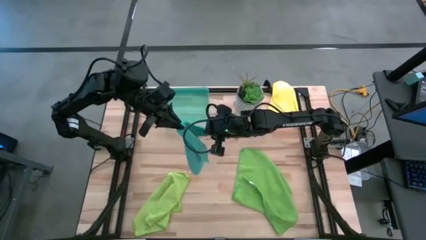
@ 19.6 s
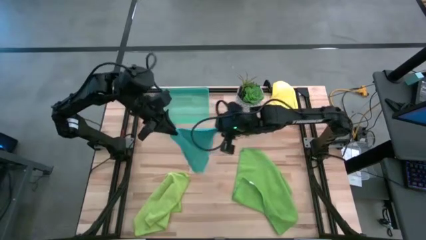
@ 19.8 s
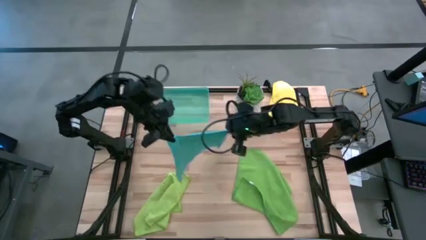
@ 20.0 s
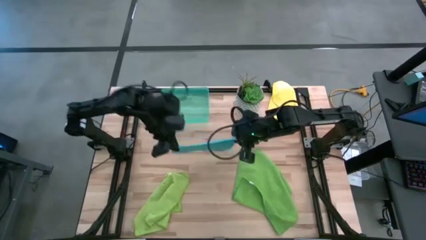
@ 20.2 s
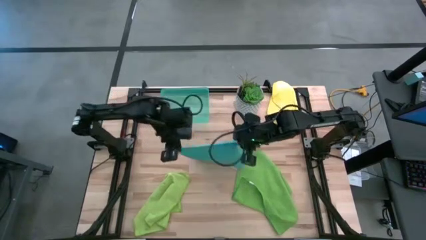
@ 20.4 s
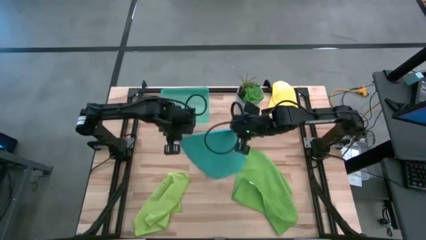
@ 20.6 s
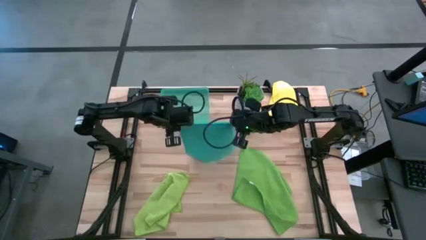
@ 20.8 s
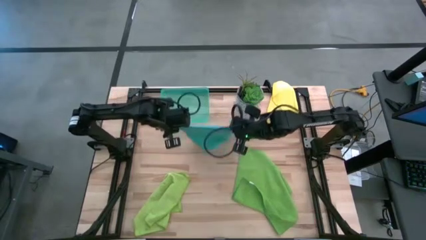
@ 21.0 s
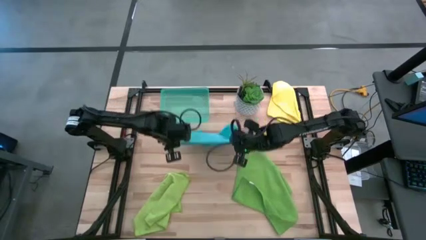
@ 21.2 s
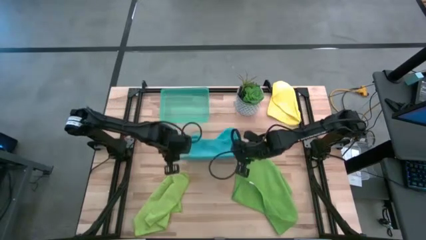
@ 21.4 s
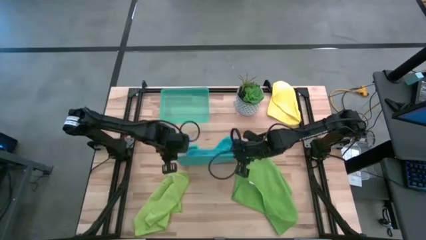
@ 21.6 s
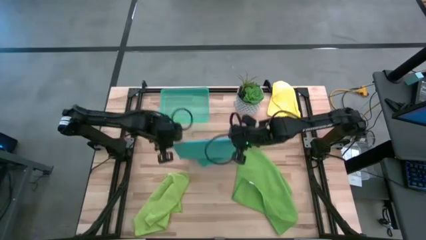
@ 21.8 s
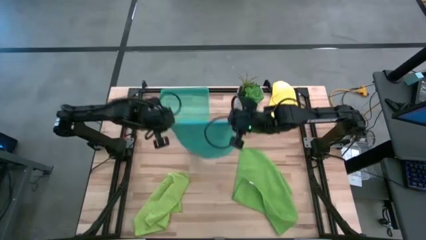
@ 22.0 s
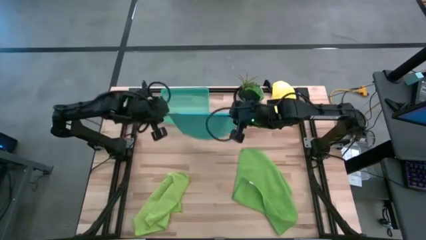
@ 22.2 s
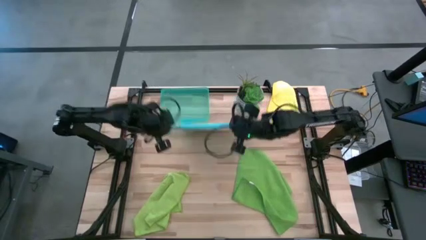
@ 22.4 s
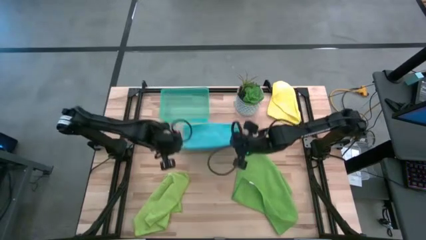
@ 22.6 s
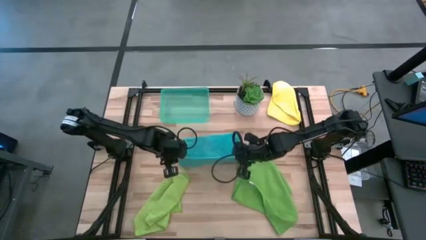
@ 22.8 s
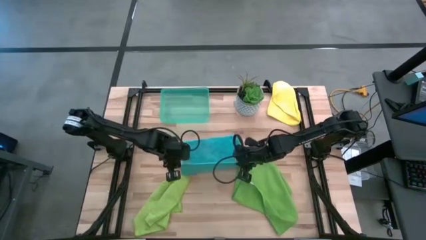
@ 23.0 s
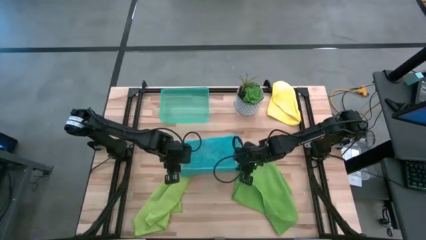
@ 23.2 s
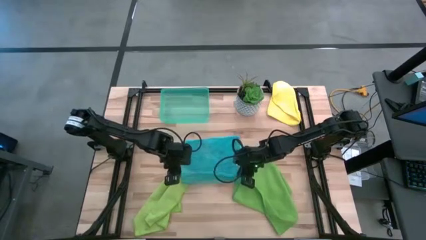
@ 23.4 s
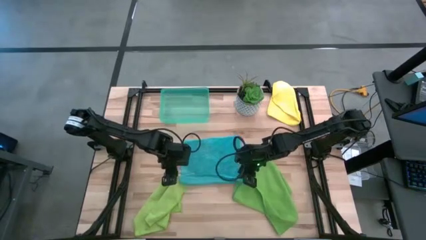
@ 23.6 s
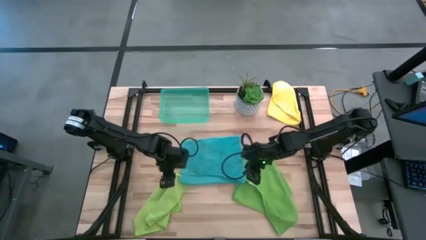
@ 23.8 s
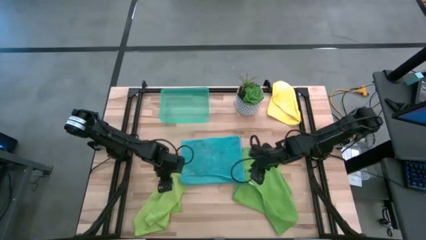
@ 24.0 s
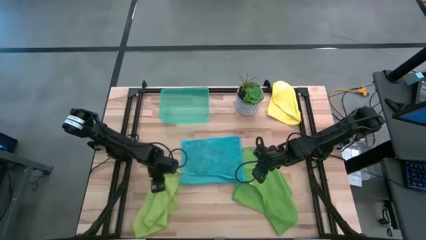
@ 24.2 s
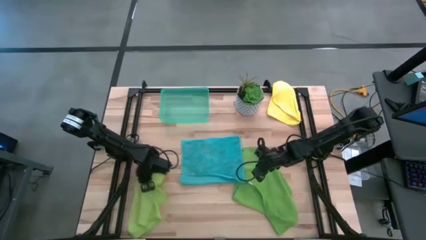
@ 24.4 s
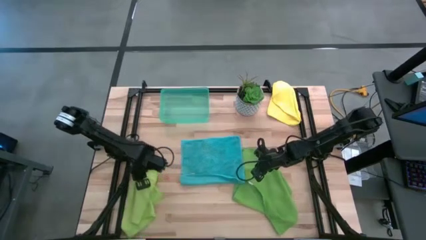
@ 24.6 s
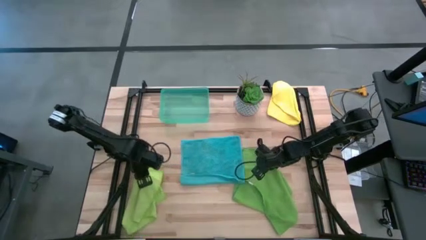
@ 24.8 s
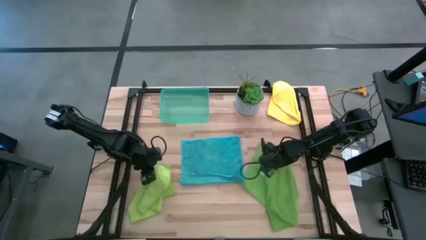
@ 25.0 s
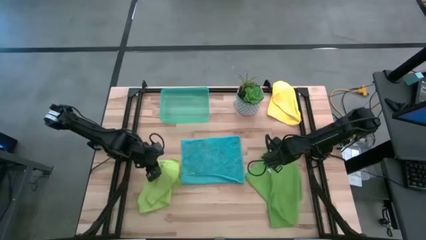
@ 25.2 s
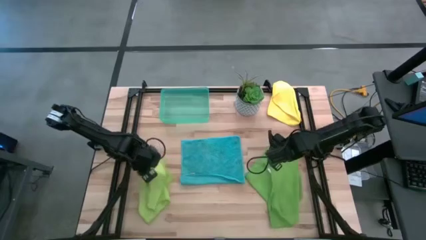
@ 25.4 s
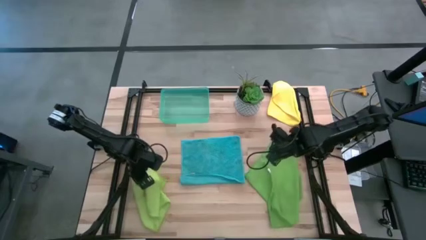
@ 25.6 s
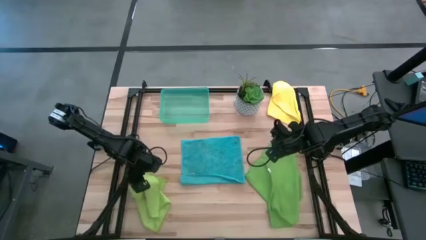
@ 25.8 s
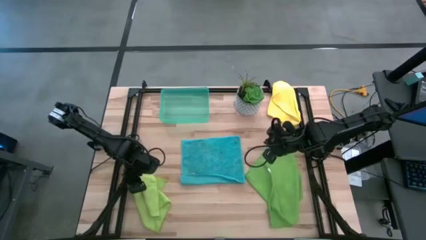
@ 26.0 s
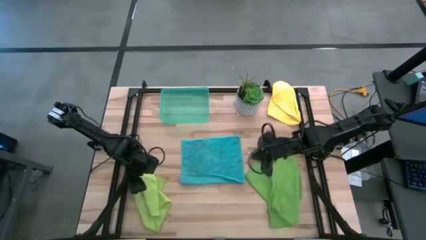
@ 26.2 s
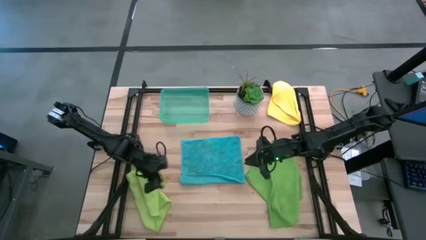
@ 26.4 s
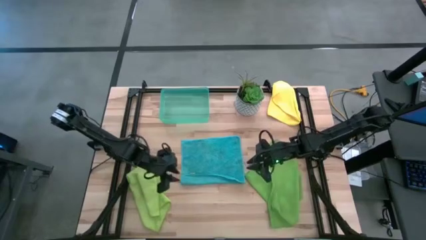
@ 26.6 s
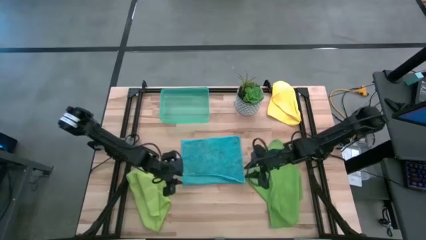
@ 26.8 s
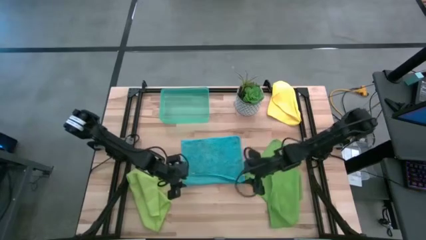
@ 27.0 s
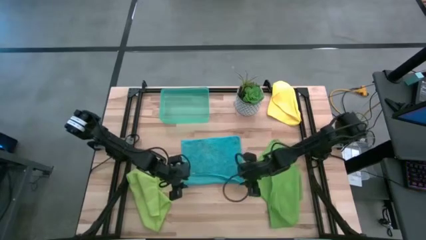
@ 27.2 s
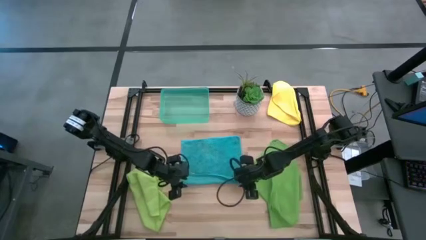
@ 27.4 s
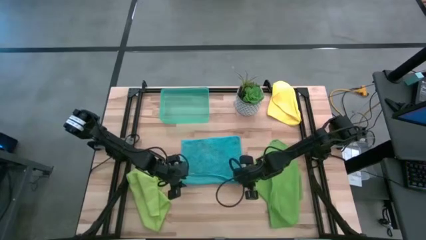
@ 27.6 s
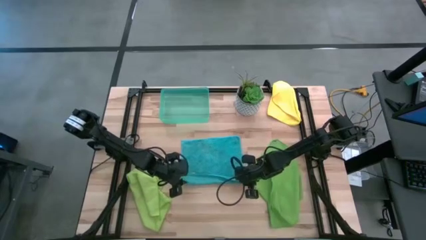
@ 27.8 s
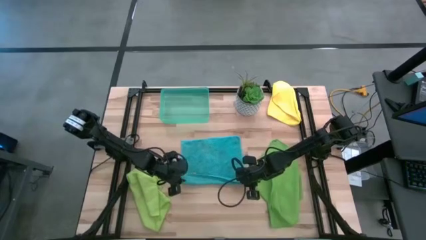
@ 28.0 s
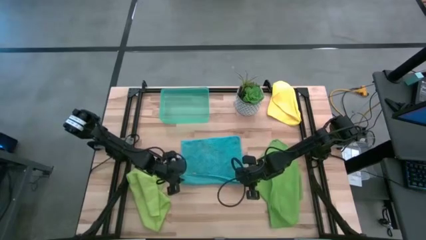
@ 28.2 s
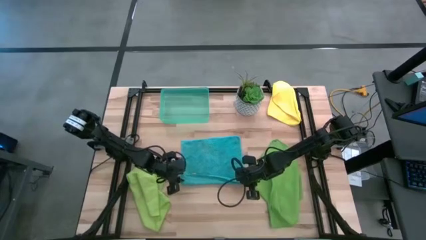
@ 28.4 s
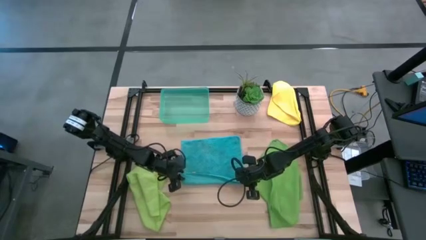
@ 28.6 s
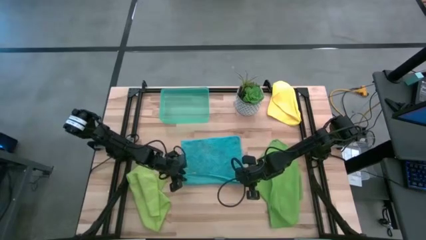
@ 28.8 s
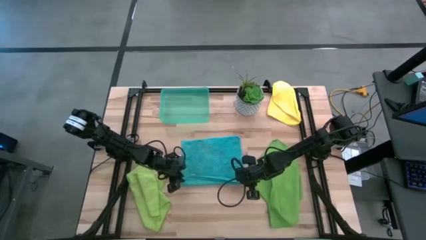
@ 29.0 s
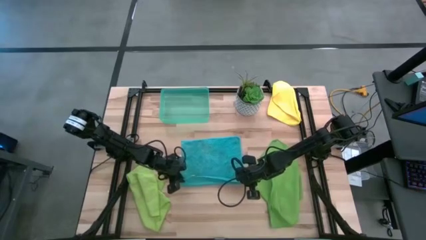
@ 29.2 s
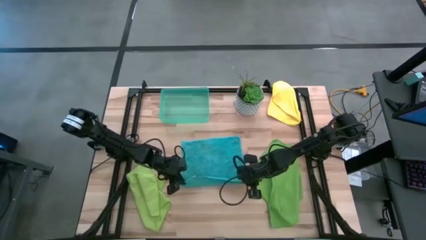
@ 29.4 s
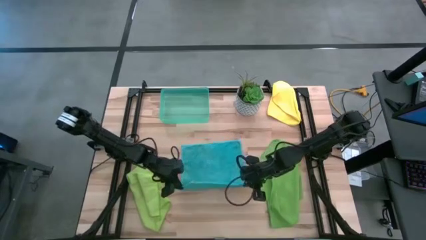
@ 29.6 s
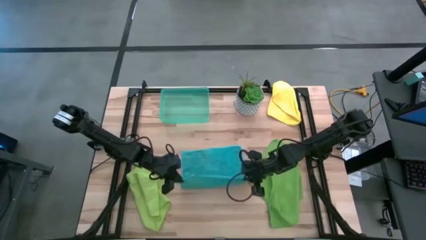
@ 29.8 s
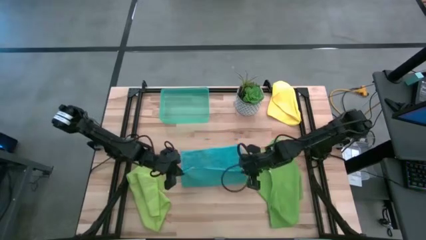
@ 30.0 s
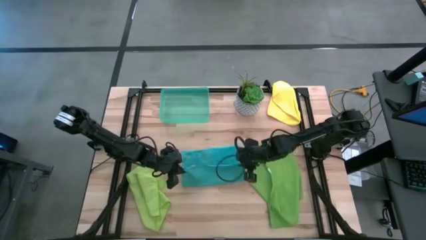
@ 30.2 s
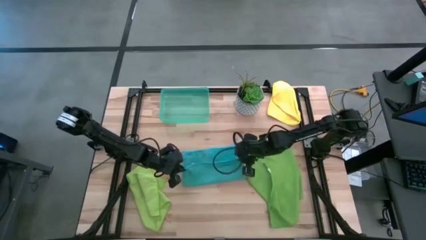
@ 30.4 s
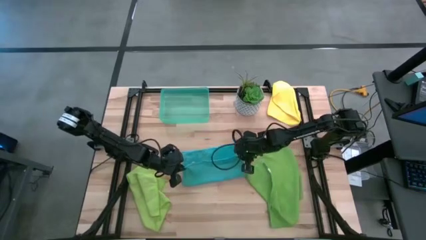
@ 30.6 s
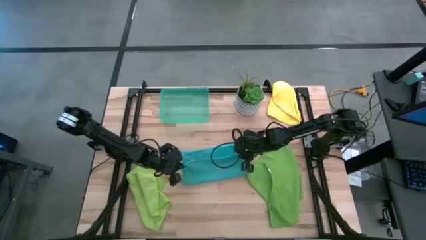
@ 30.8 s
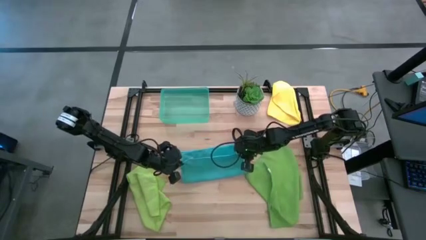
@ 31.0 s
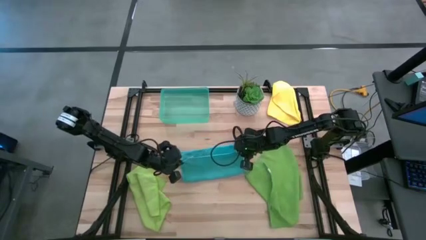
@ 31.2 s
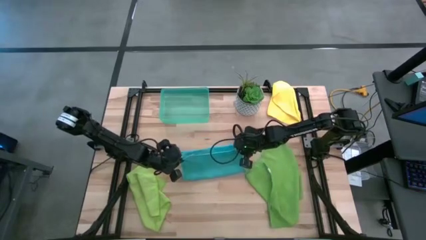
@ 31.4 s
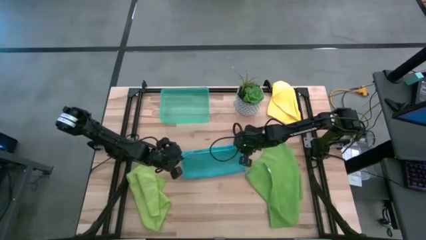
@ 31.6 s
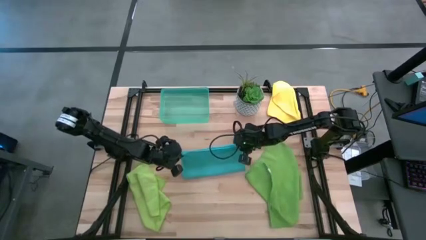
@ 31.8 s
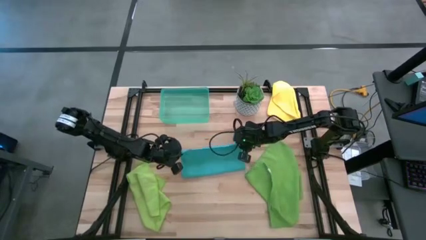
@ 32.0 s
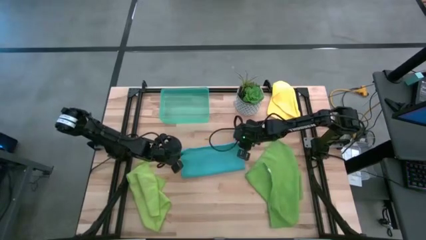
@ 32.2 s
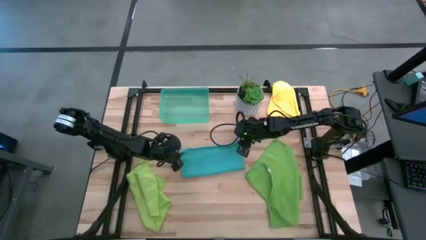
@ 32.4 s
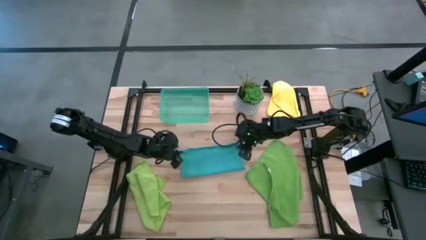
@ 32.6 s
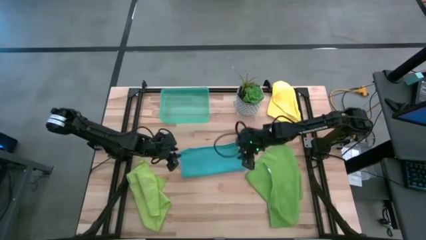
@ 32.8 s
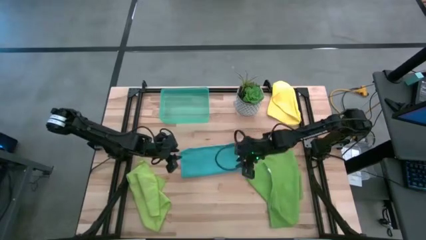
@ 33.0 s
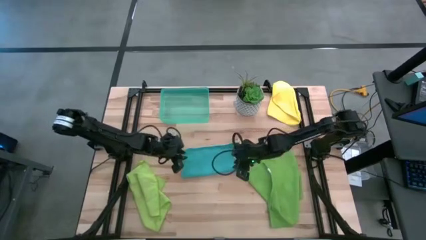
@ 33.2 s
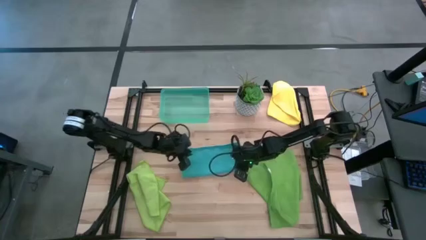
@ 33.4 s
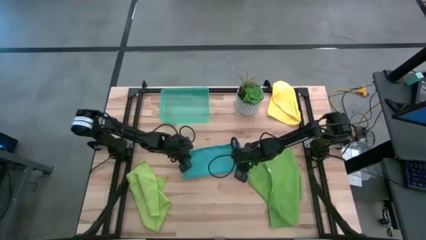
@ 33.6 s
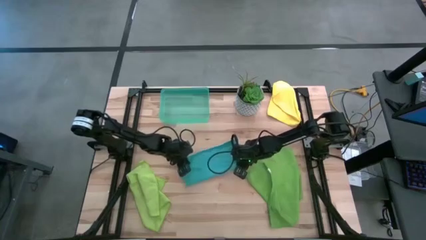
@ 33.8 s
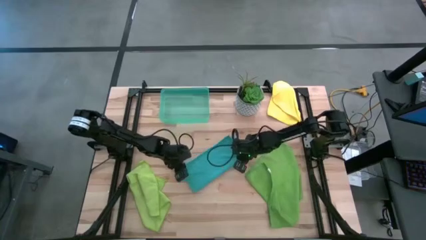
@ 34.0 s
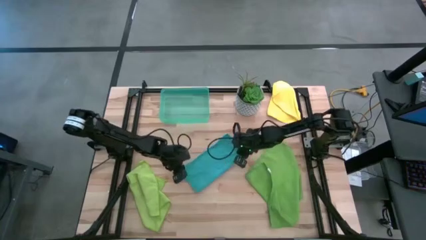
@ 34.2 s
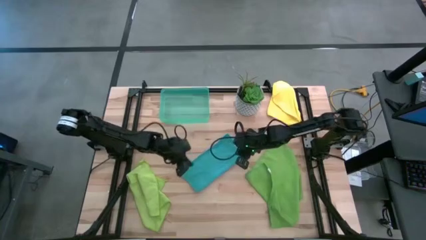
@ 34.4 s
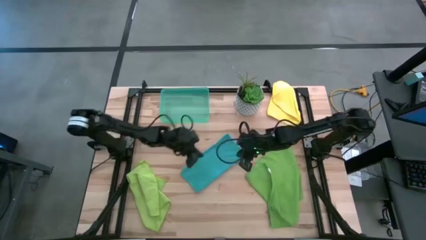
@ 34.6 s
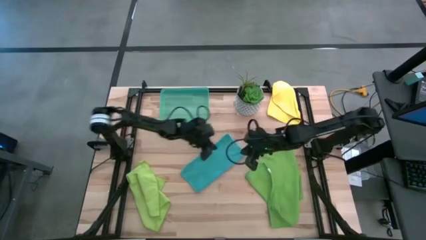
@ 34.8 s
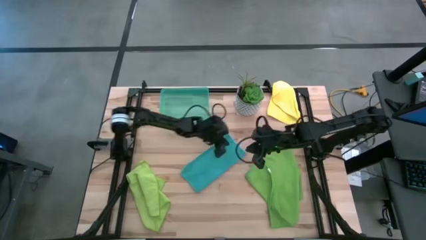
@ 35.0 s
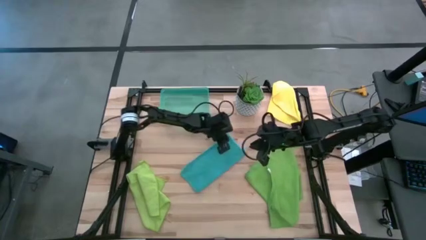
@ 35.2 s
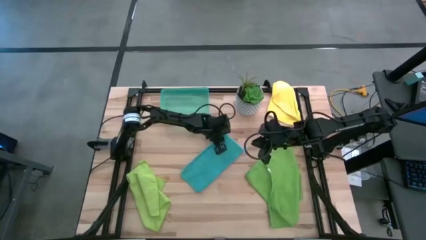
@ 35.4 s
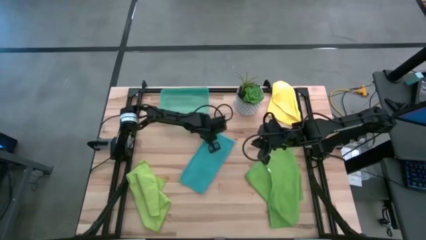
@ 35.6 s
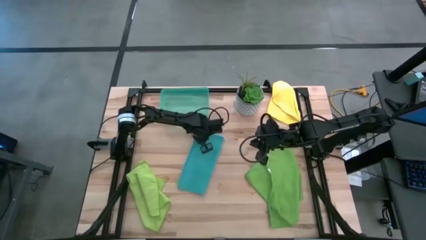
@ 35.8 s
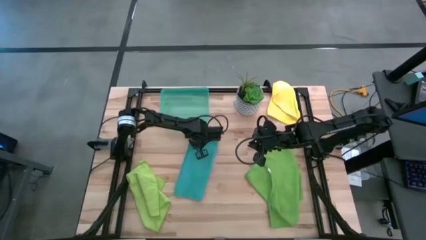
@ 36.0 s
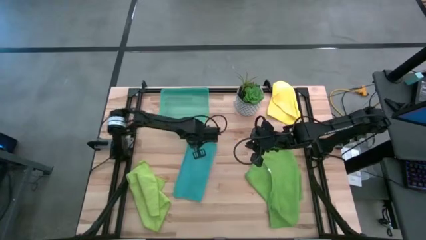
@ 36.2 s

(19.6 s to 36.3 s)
Task: Fold microfiber towels
Fold the blue microfiber cloth
